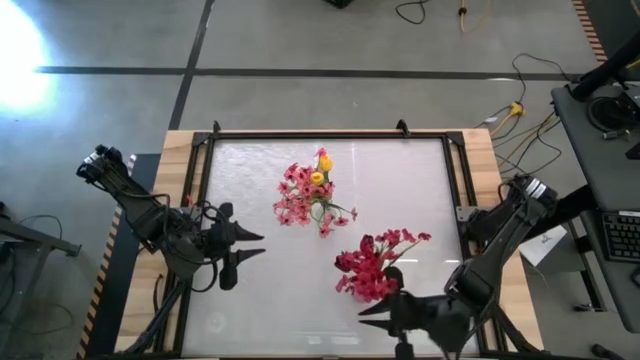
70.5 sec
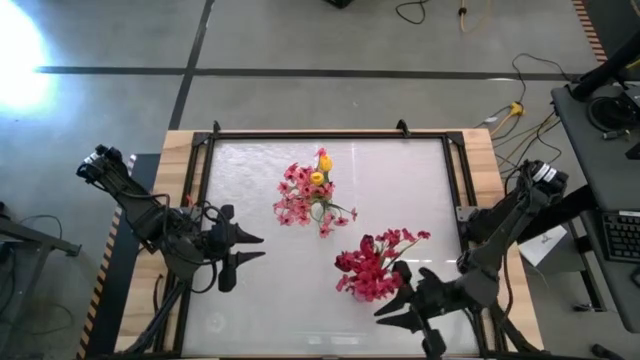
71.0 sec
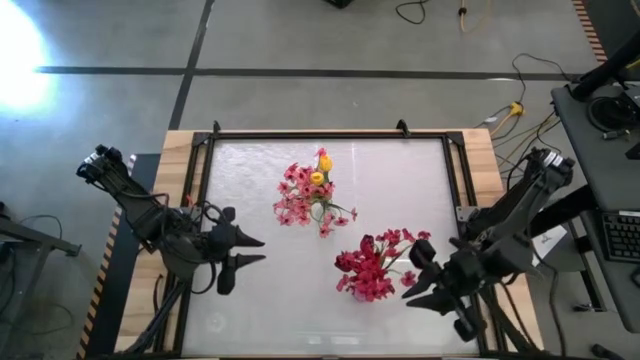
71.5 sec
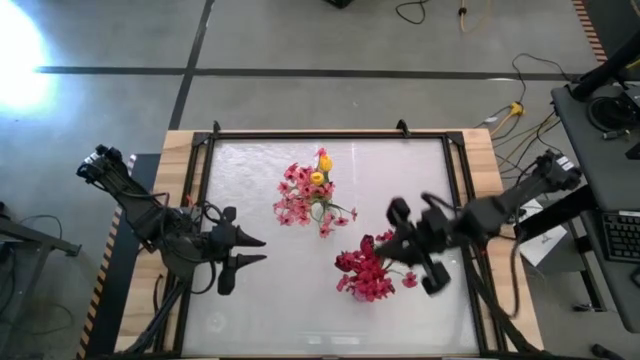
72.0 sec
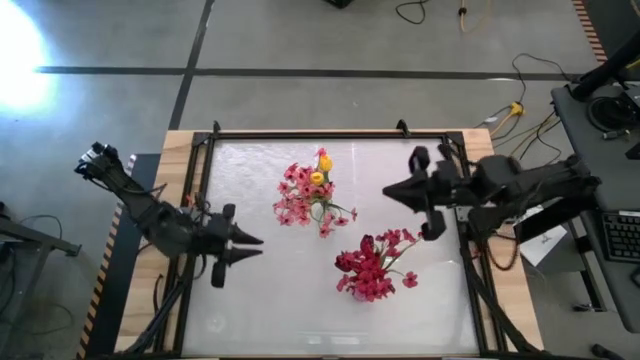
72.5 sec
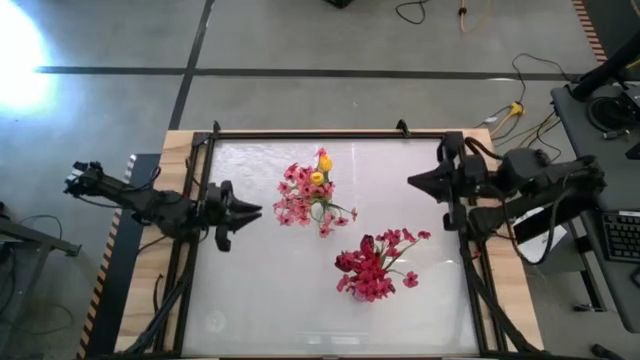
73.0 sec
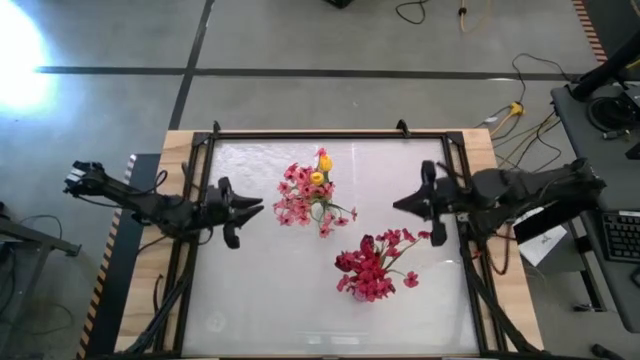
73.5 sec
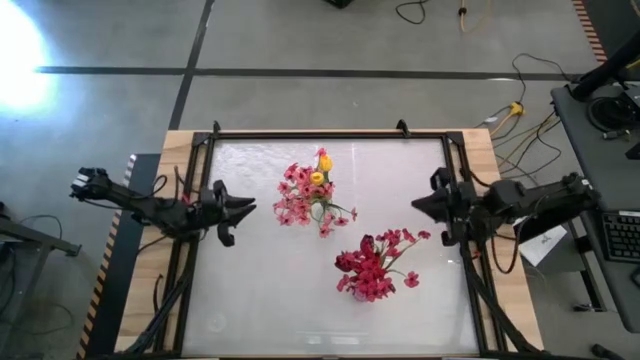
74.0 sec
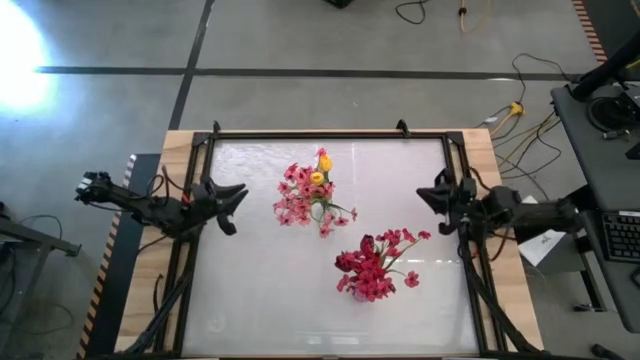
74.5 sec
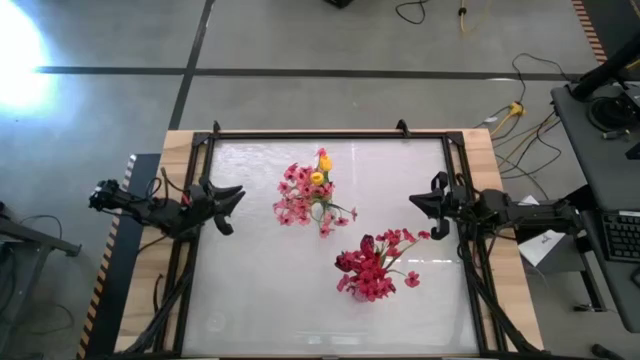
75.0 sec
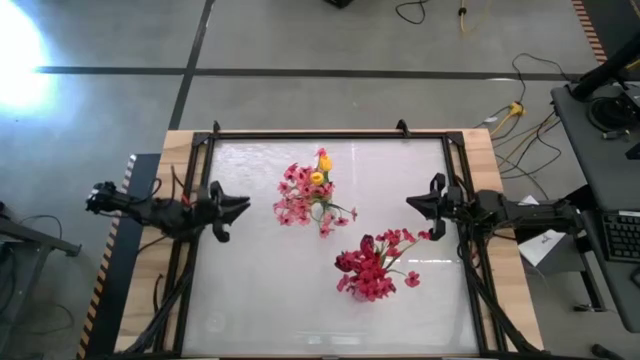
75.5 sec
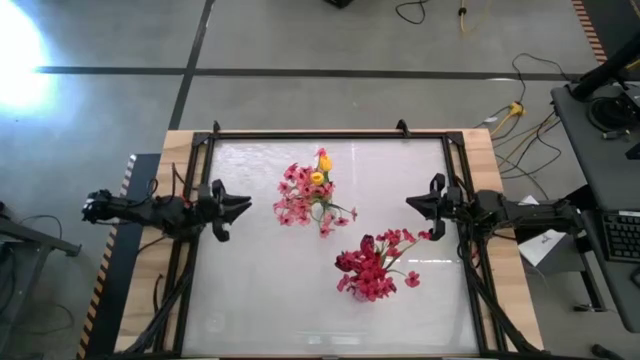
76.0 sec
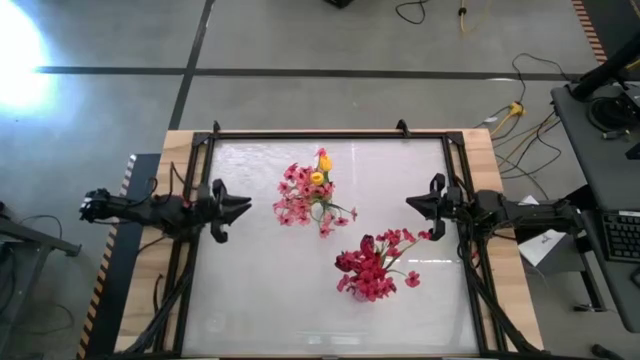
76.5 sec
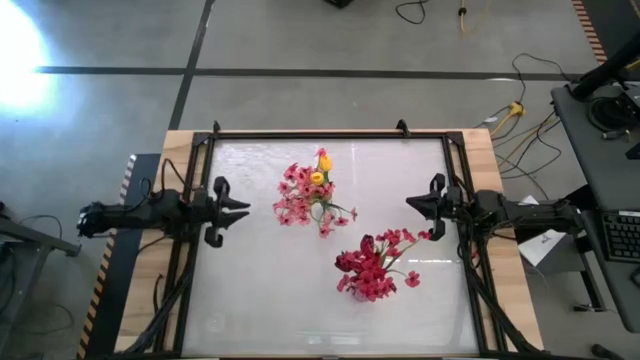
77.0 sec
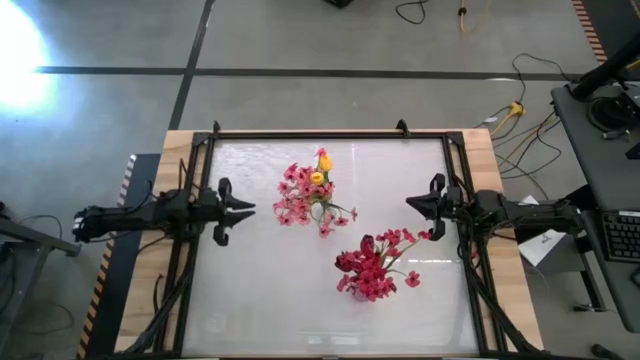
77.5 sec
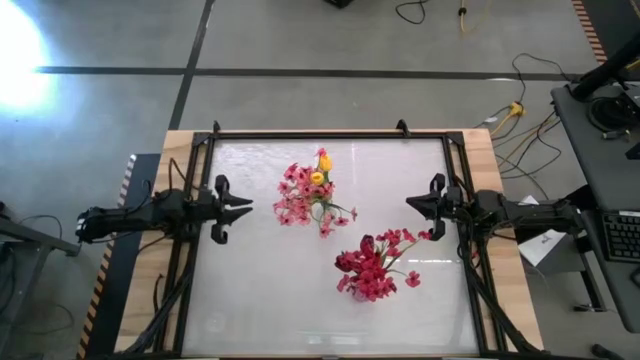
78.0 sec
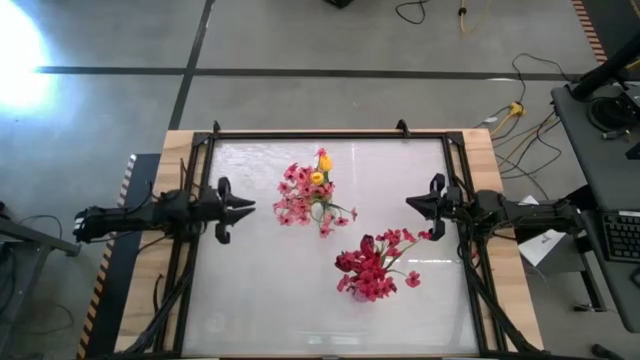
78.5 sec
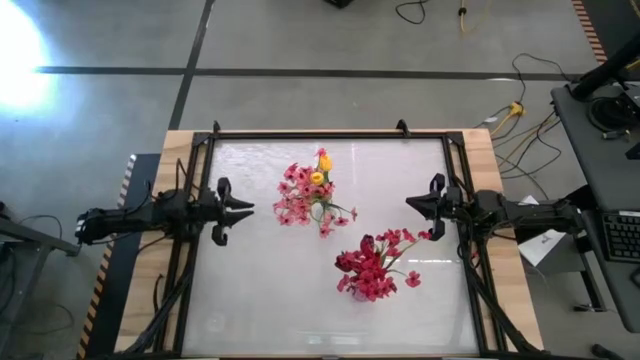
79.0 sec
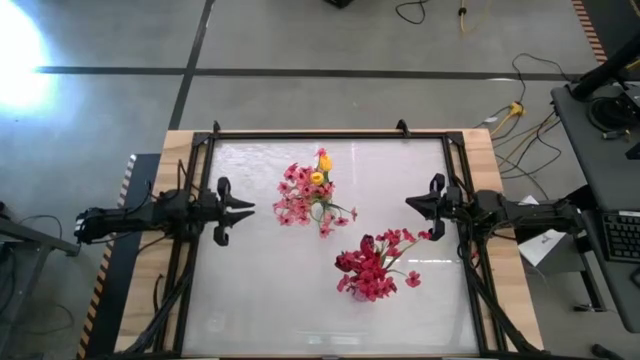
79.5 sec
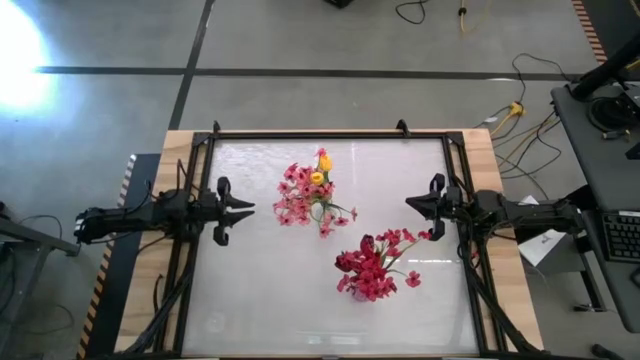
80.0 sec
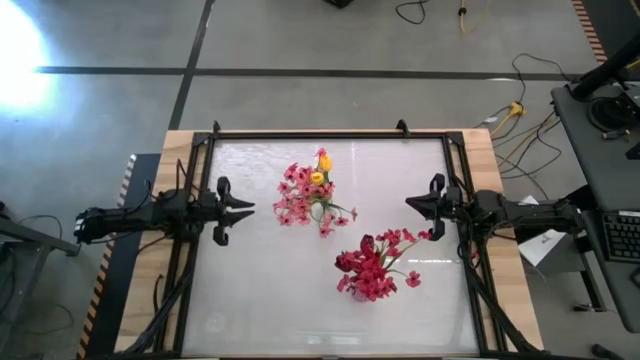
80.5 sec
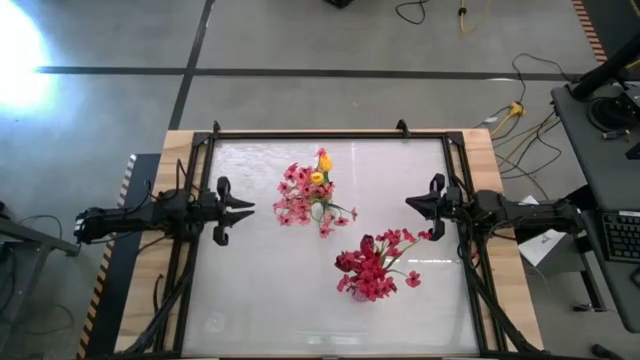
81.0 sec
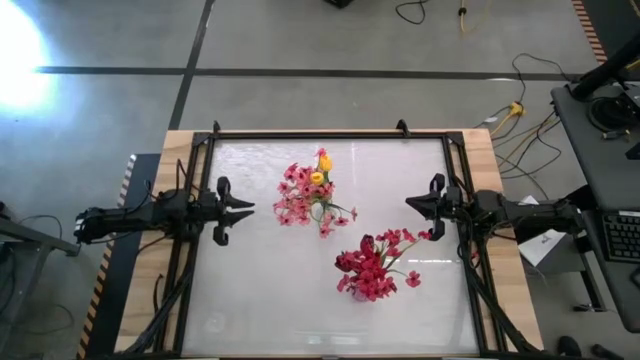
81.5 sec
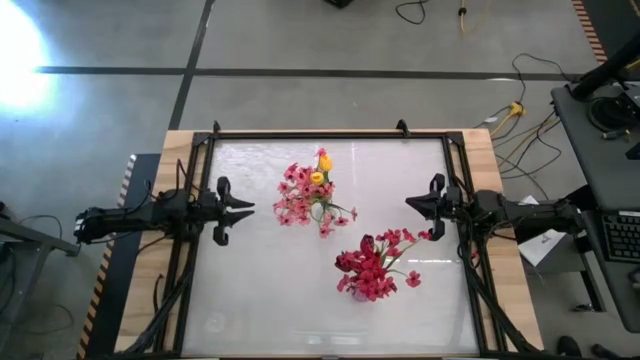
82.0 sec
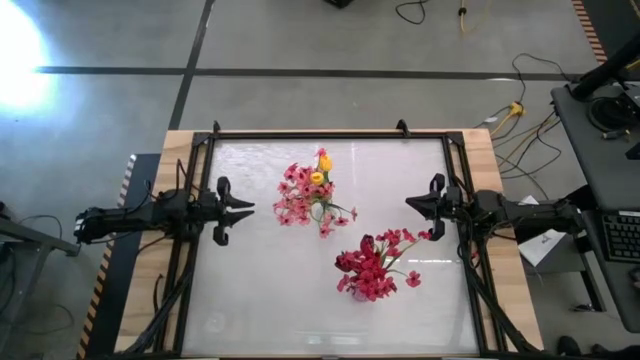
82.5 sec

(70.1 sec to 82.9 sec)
Task: Sort flowers into vase by color
Return to Home Position
